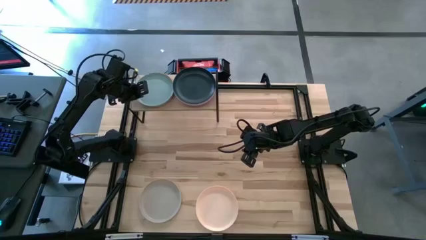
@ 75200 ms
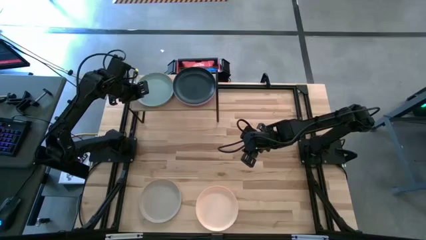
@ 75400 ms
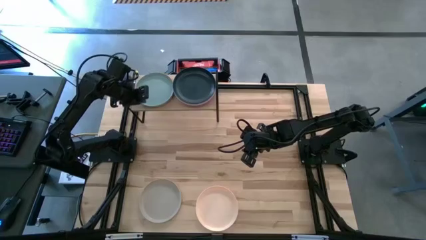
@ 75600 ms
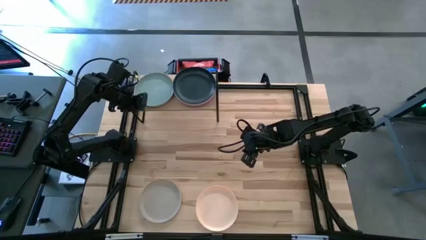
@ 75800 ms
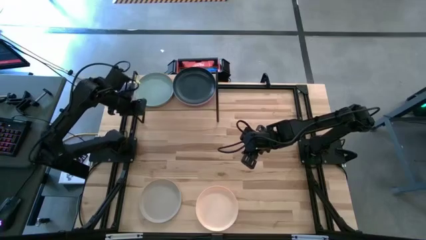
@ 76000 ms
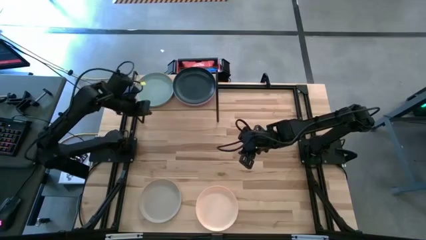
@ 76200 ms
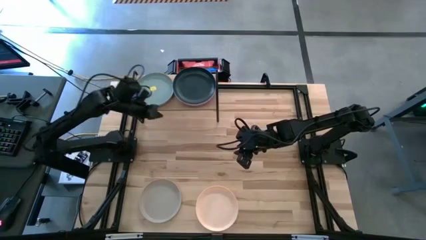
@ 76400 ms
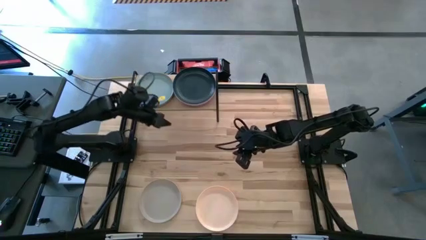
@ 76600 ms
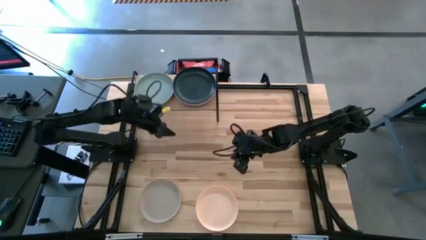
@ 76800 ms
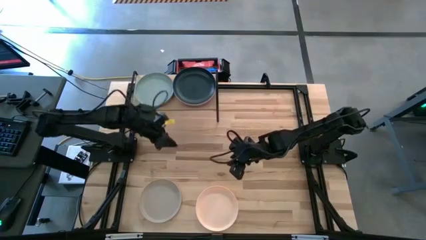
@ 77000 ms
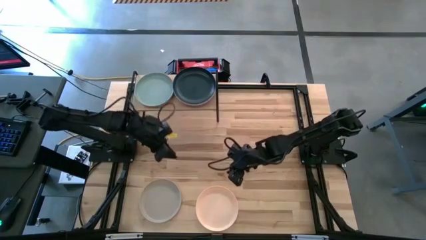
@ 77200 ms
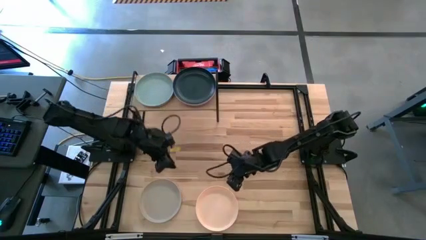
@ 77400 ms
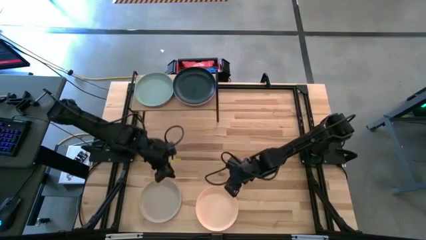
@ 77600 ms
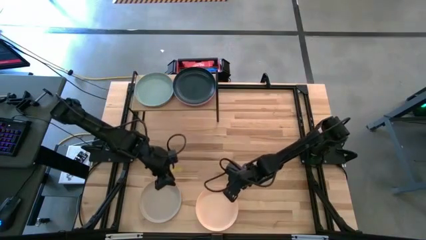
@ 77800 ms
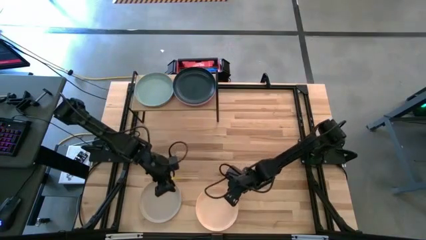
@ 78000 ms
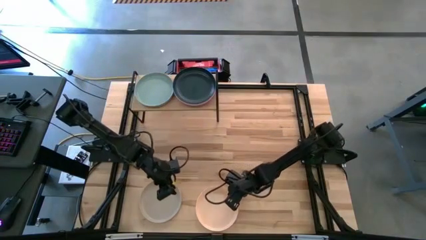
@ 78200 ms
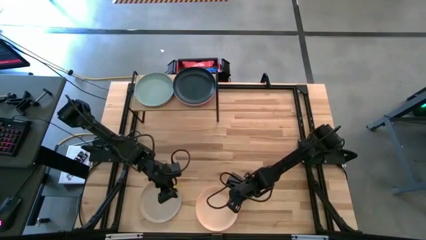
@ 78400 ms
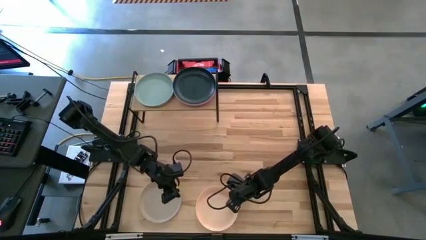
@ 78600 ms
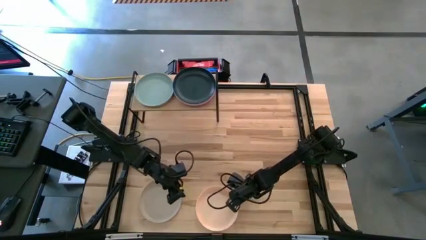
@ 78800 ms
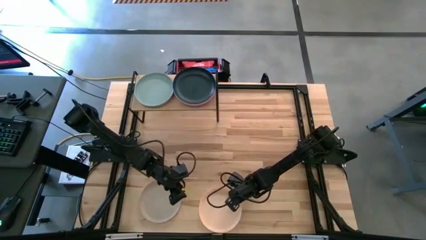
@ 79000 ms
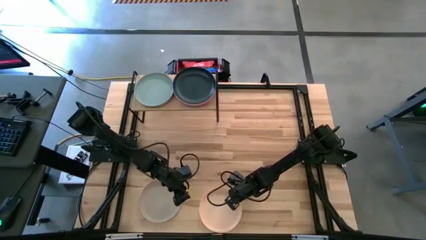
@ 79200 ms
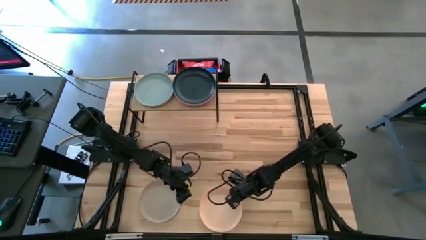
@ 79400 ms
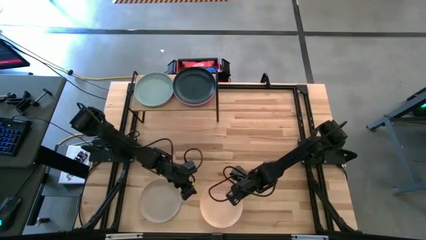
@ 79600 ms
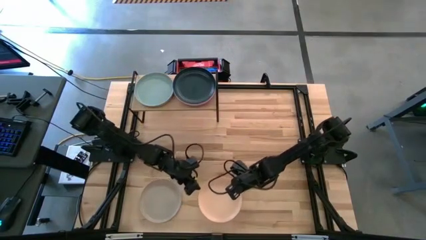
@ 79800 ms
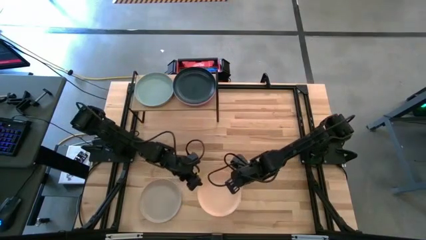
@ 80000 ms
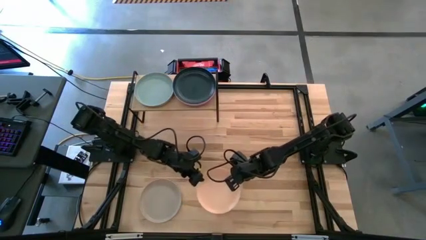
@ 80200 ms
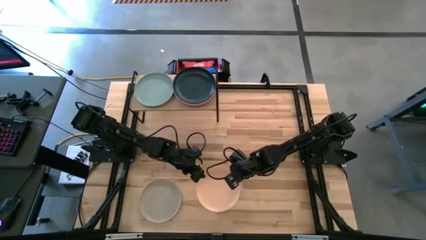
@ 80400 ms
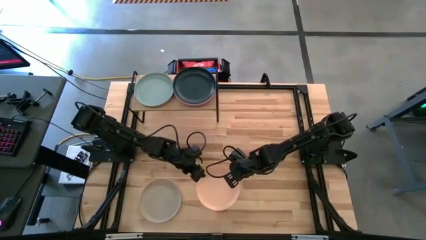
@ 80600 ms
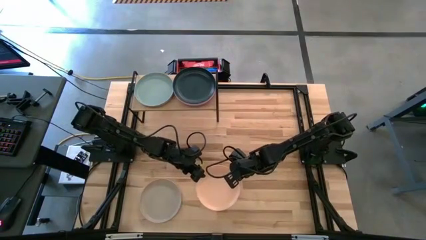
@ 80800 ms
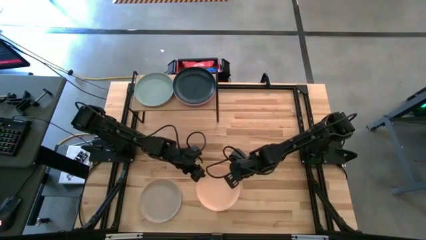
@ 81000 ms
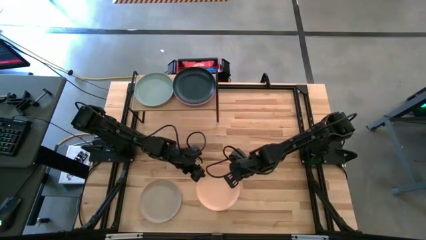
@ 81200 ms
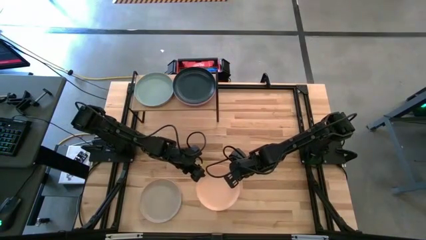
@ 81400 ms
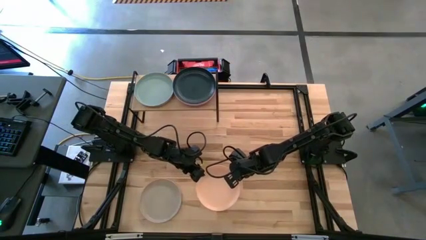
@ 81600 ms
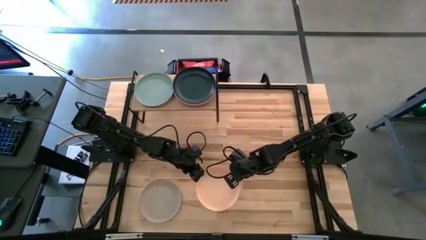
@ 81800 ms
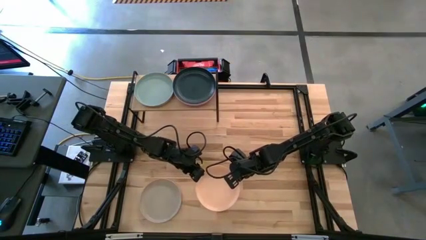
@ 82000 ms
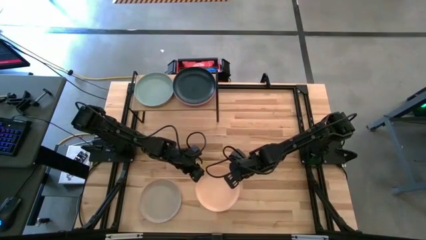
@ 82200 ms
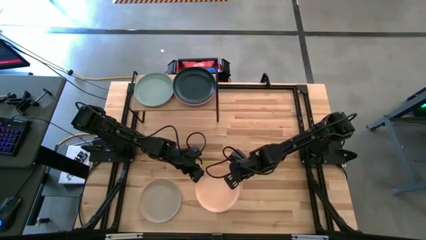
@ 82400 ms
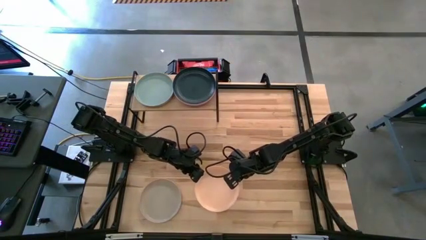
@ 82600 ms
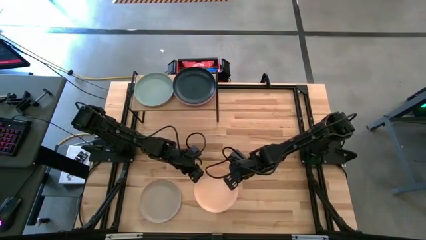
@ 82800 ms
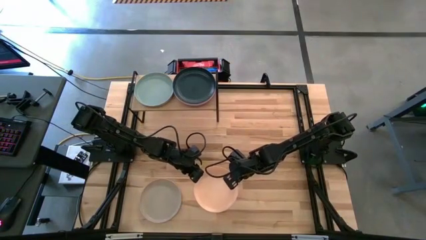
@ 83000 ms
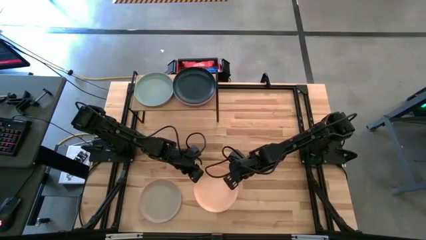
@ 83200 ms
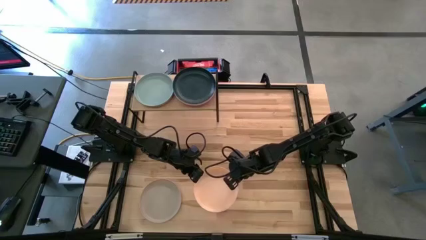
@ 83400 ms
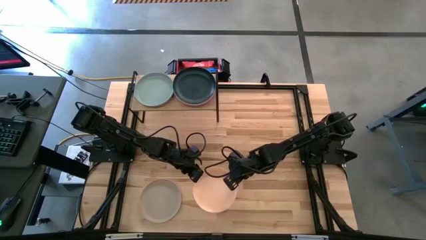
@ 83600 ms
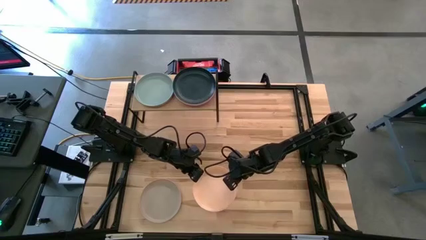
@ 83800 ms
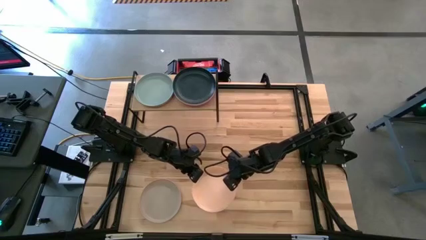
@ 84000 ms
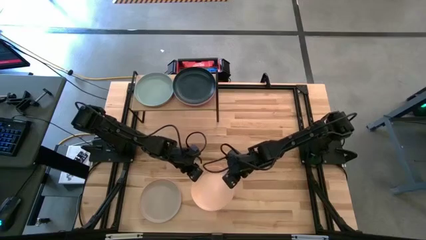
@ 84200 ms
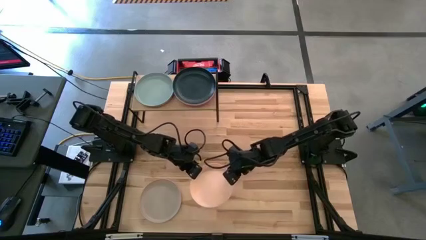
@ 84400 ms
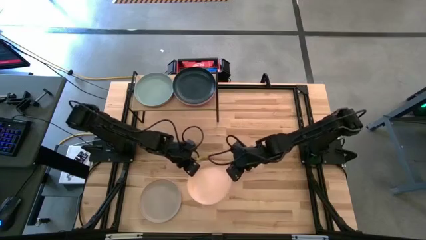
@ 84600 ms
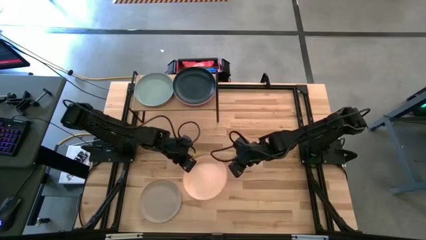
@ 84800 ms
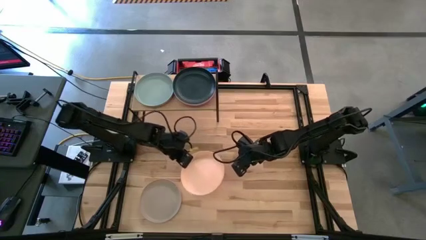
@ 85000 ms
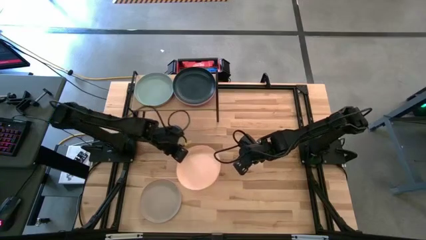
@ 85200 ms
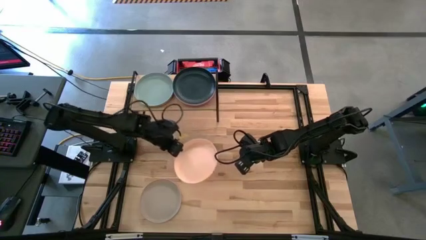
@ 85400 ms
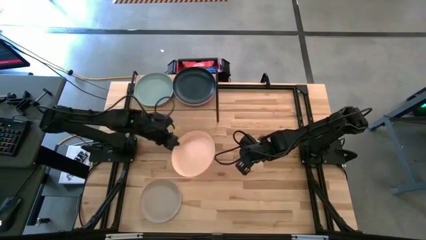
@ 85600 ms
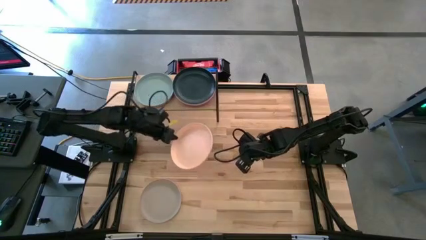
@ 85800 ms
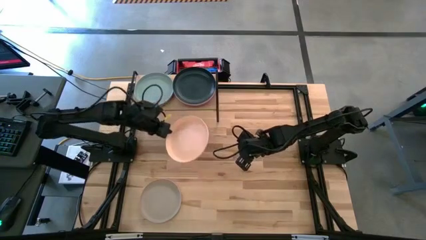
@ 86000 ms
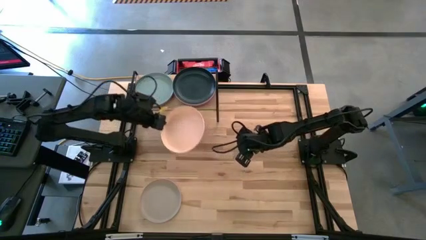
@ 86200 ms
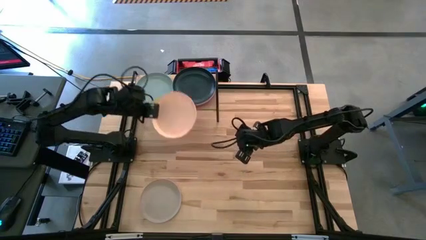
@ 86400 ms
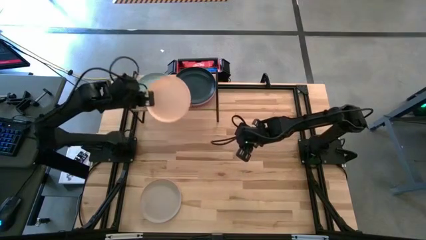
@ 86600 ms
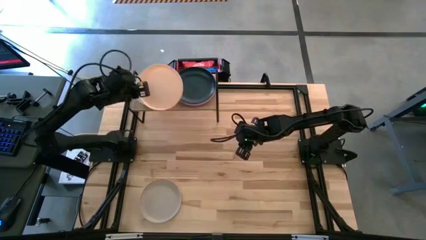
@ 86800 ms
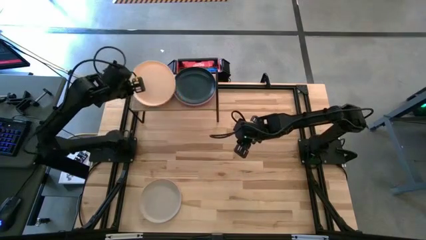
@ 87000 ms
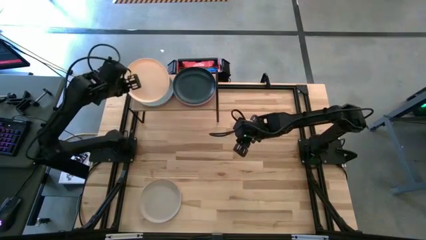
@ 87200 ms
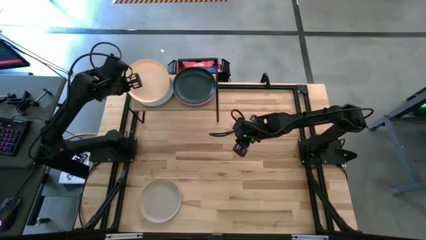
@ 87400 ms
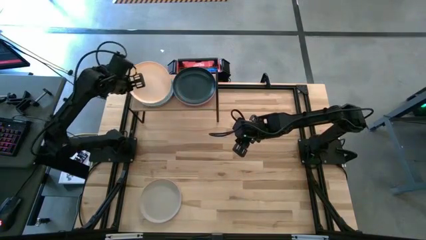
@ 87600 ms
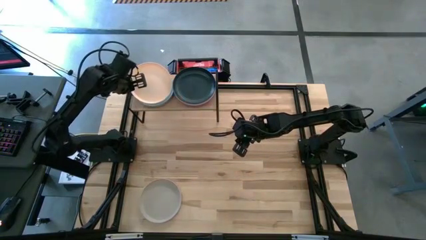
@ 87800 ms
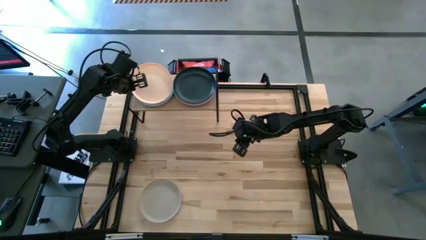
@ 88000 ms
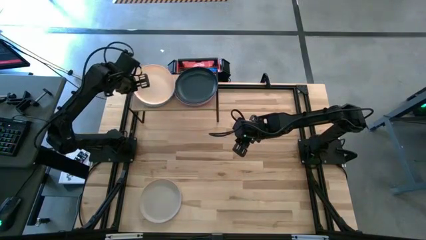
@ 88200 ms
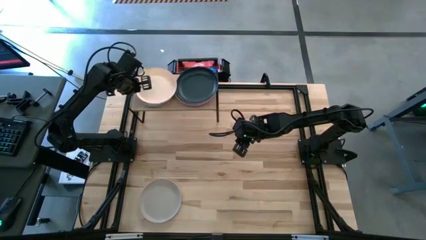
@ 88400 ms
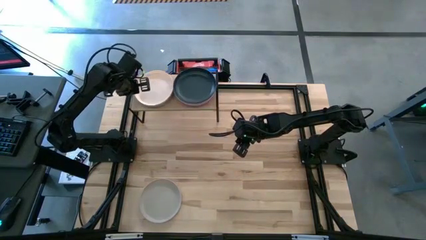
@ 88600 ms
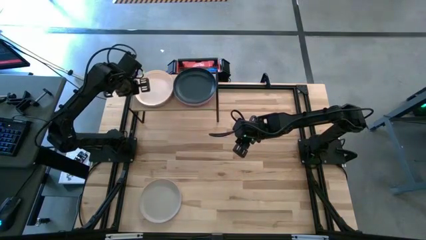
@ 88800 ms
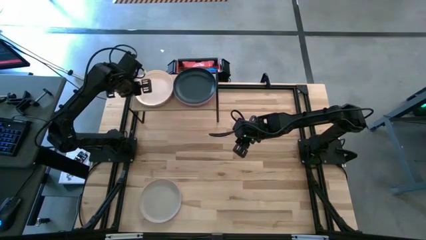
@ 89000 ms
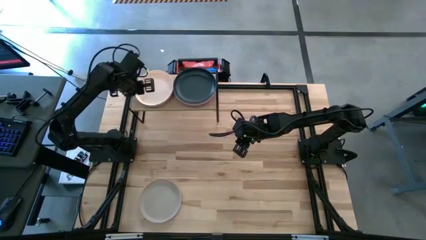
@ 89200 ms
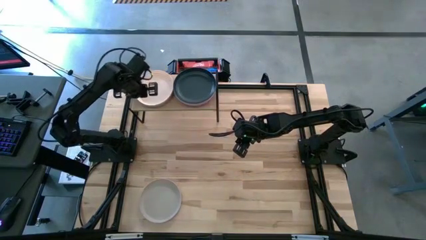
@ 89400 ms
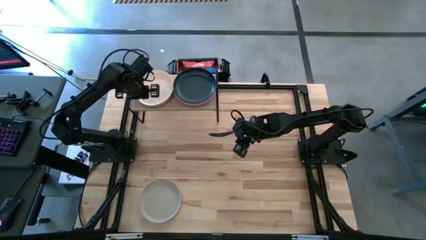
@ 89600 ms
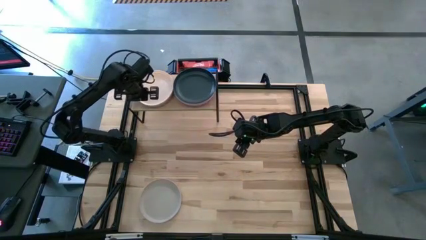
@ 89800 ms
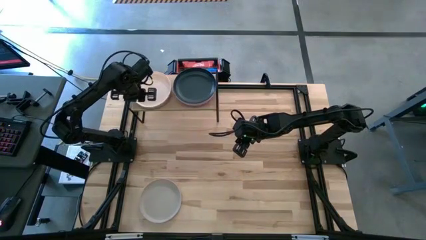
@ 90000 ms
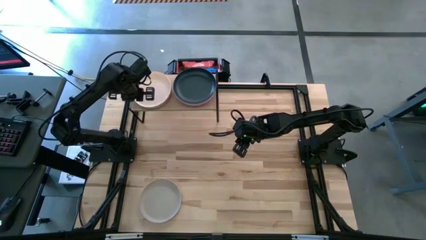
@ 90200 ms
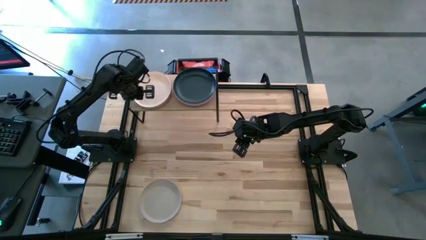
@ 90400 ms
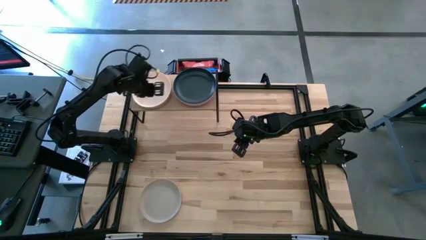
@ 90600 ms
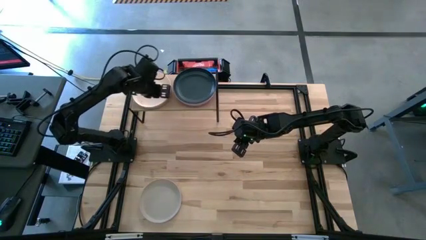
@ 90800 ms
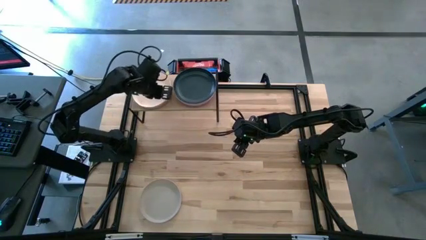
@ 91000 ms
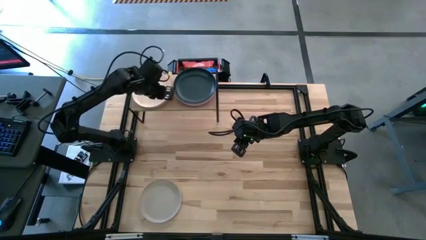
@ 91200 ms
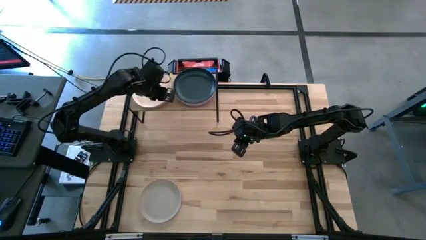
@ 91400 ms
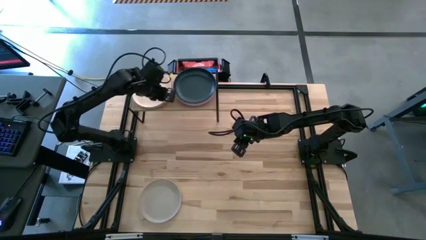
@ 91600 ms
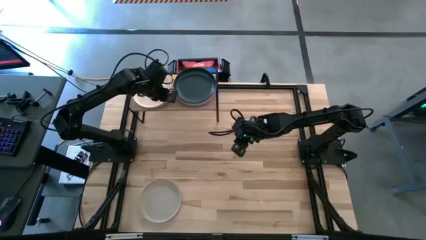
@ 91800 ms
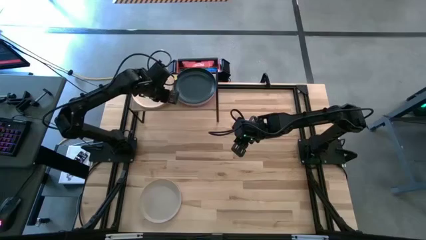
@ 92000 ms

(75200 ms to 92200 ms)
Task: Place and stack plates onto a shelf
Stack the light orange plate on top of the blue plate on the shelf
